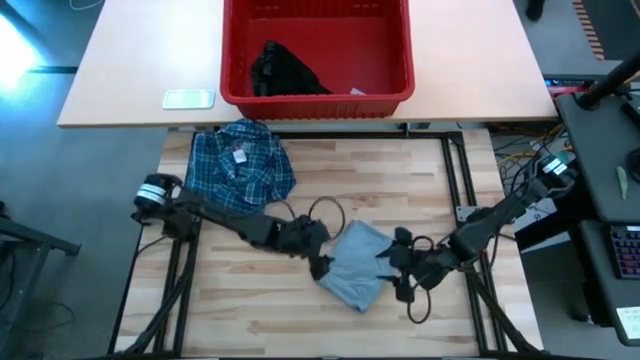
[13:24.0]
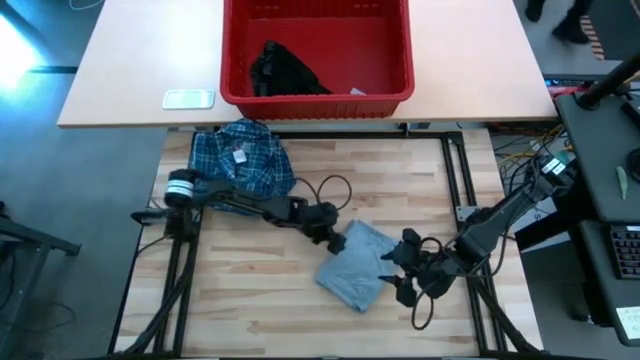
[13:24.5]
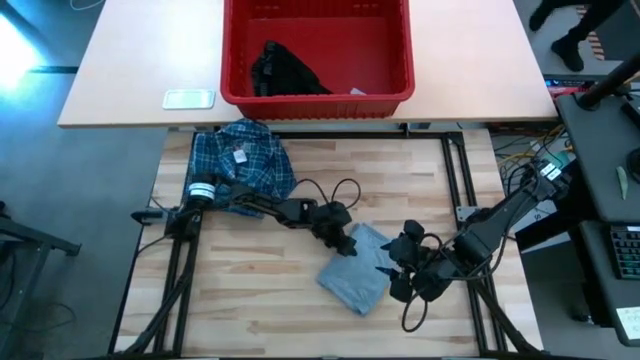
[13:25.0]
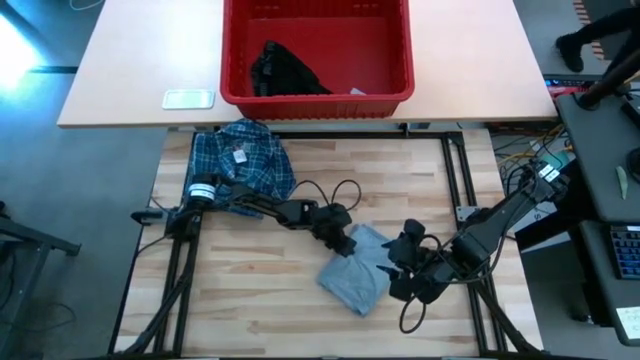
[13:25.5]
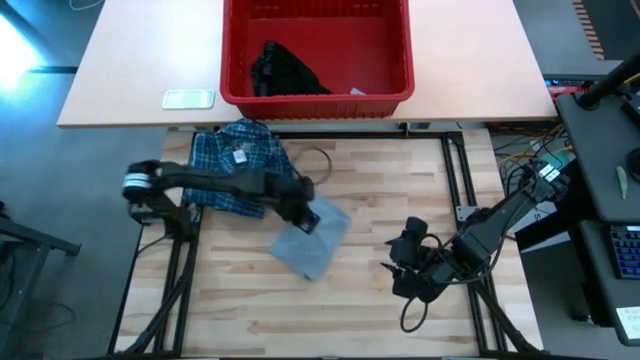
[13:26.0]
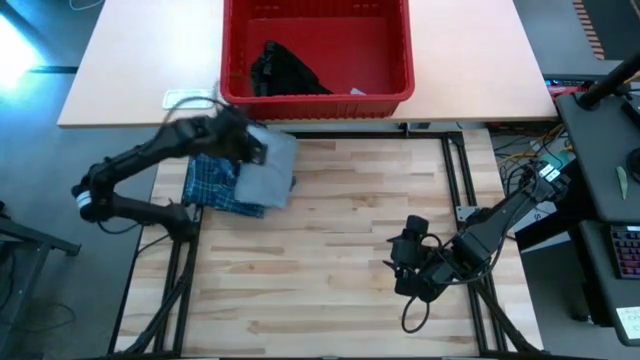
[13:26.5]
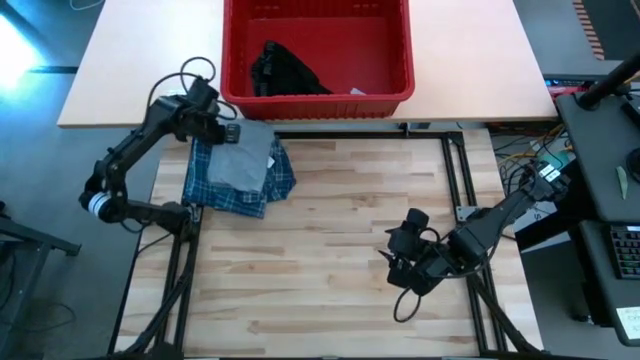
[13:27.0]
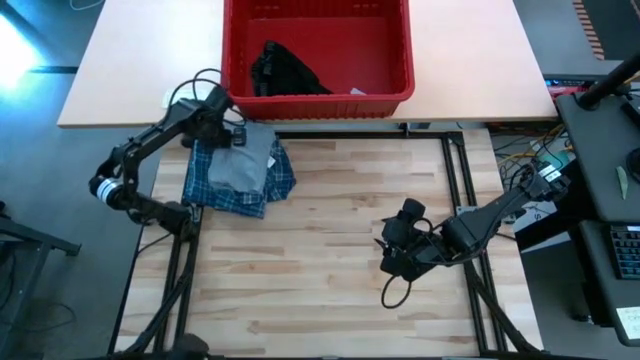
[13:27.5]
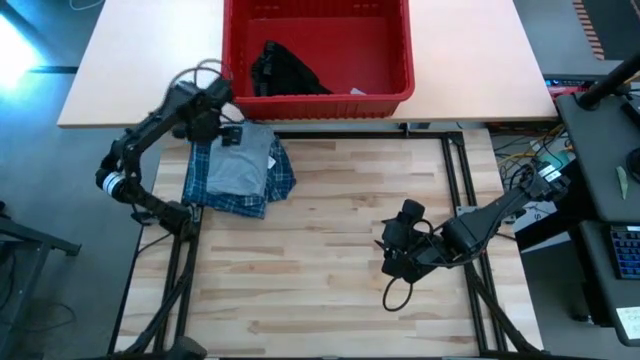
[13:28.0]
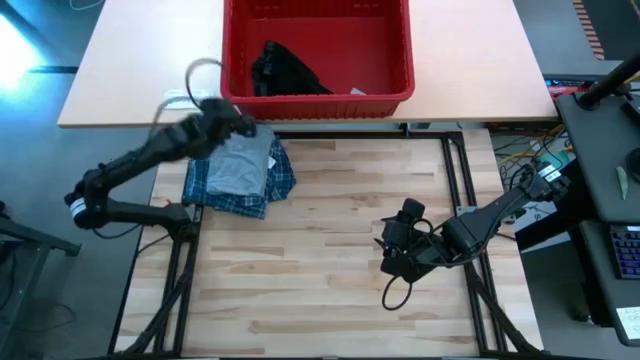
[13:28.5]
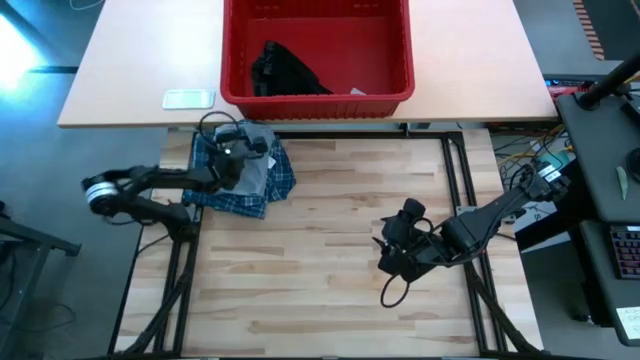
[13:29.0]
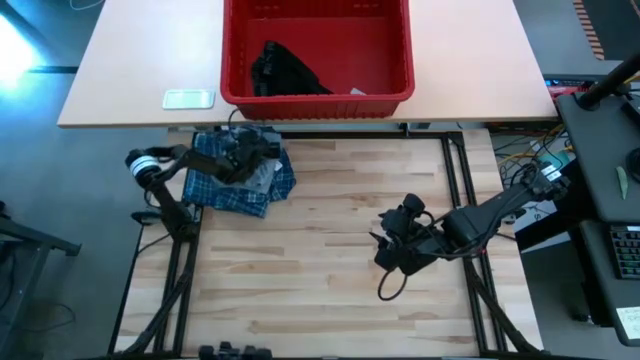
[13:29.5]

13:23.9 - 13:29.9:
Task: Fold Laundry from Bin
Stack the gray shirt on top of the blue patterned long sleeve shirt

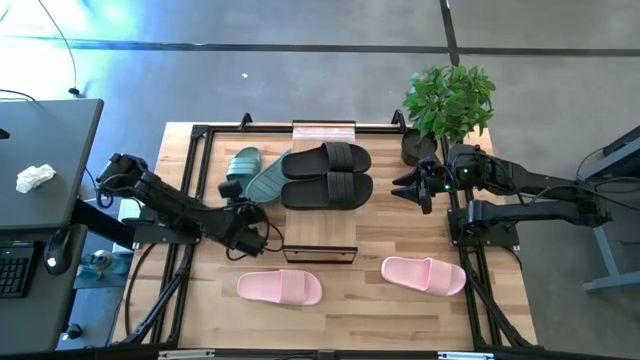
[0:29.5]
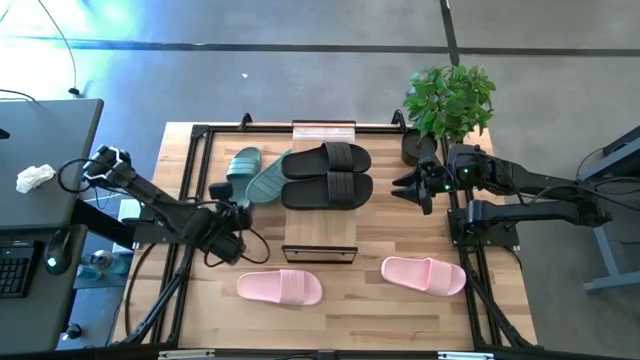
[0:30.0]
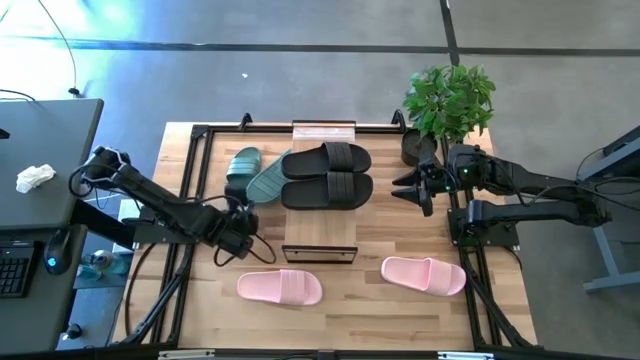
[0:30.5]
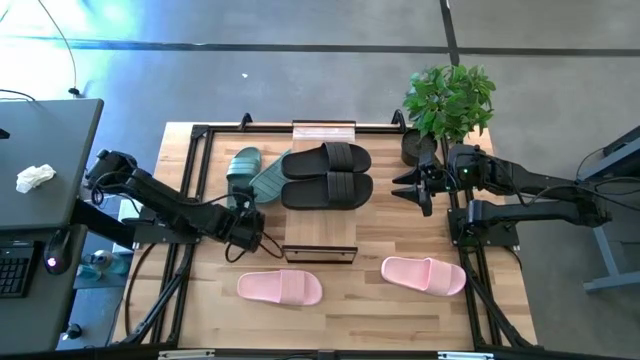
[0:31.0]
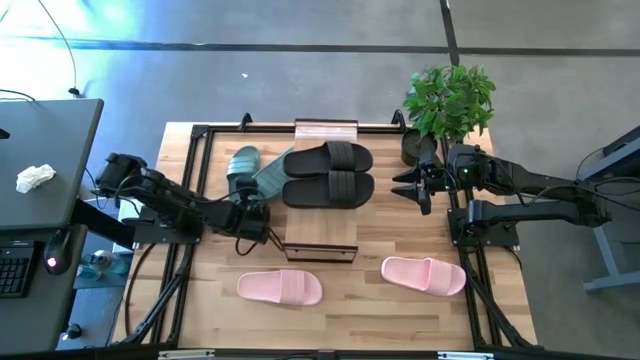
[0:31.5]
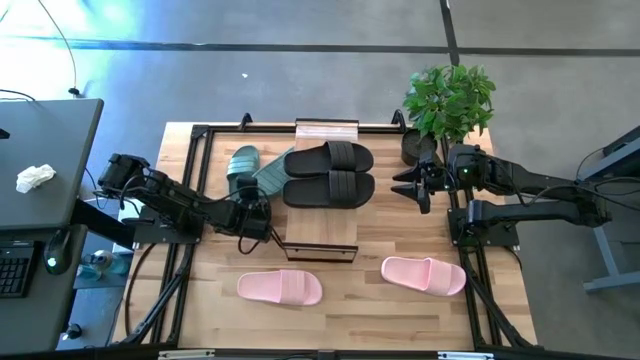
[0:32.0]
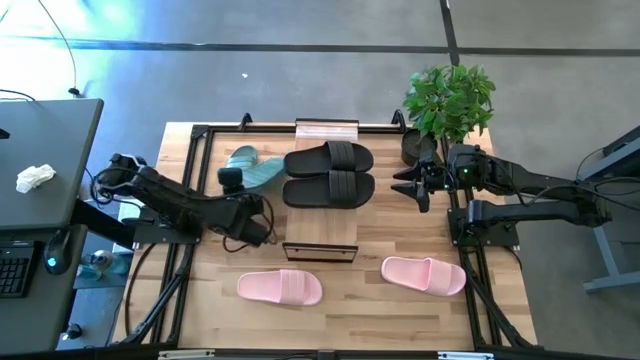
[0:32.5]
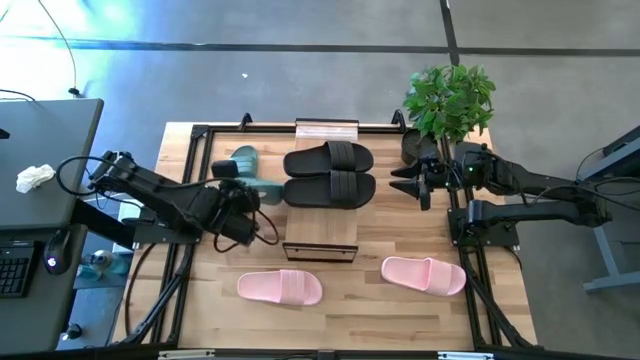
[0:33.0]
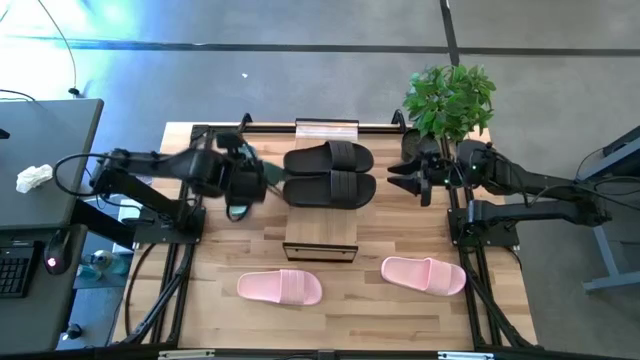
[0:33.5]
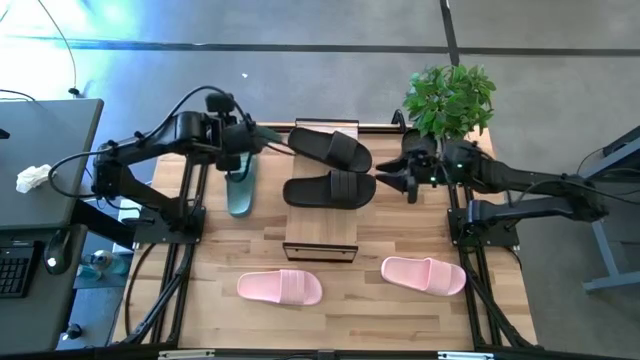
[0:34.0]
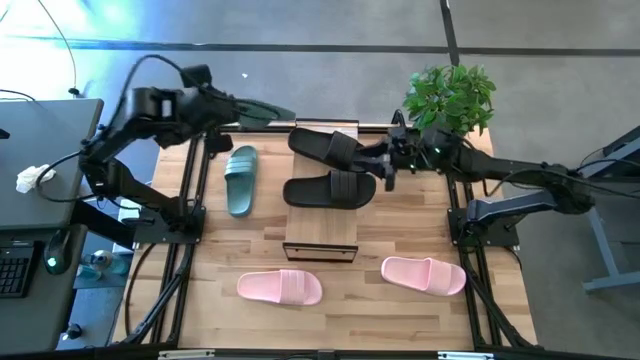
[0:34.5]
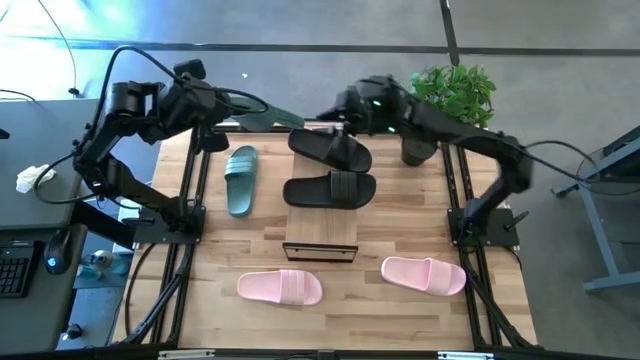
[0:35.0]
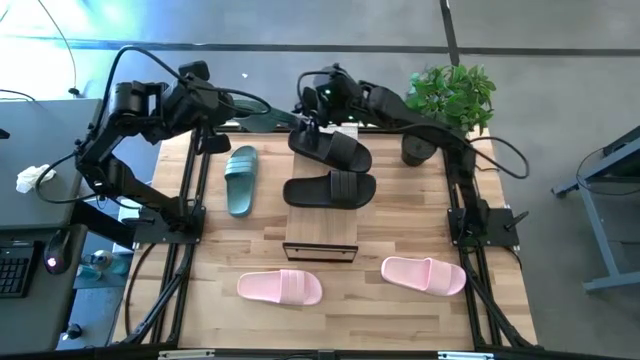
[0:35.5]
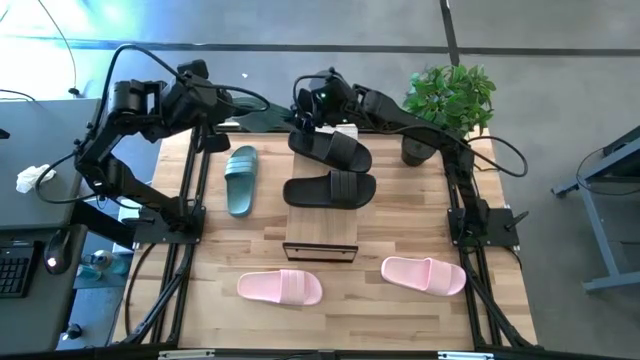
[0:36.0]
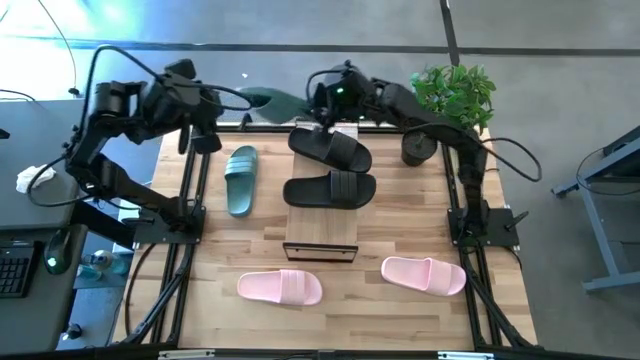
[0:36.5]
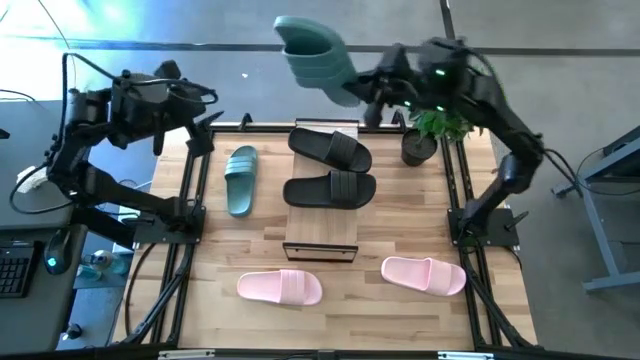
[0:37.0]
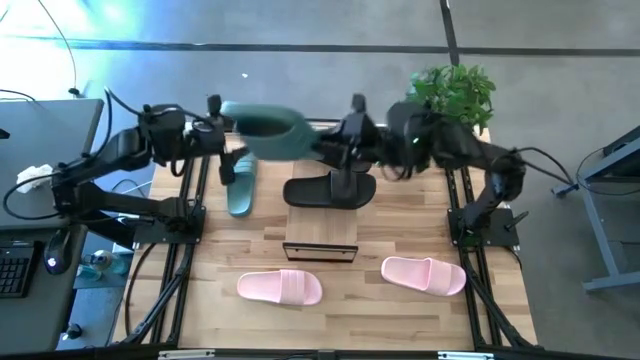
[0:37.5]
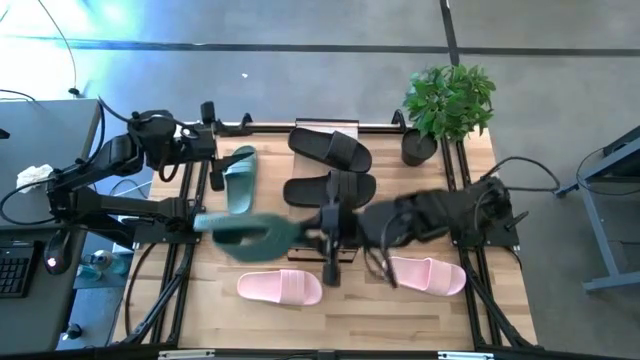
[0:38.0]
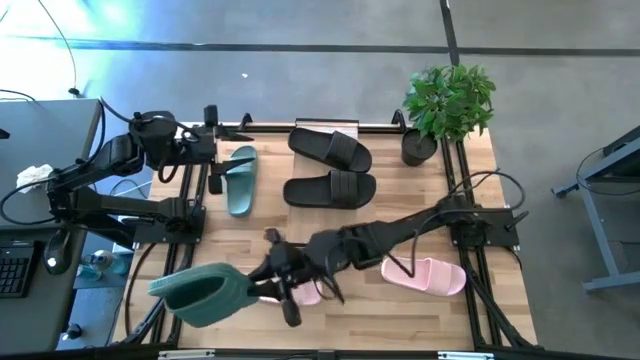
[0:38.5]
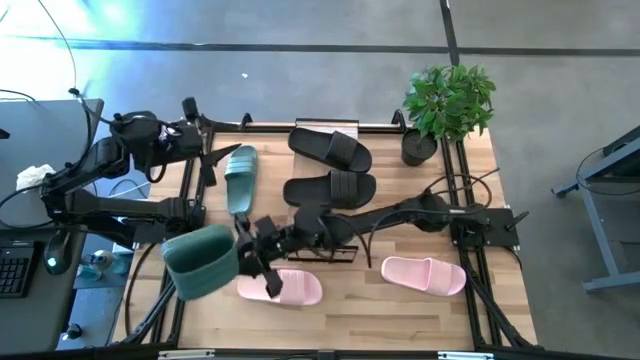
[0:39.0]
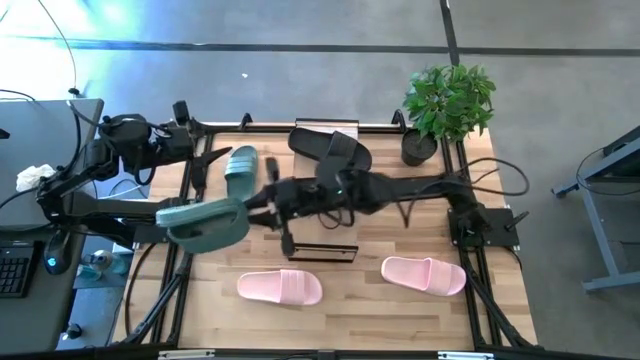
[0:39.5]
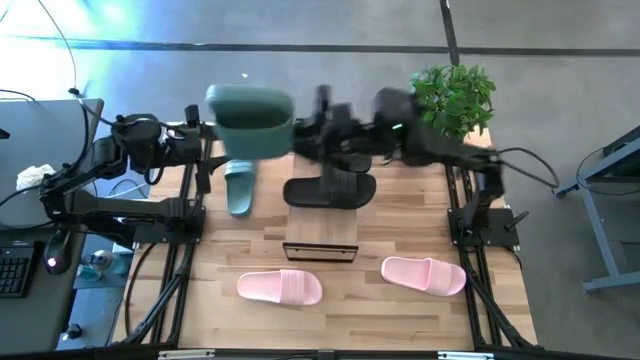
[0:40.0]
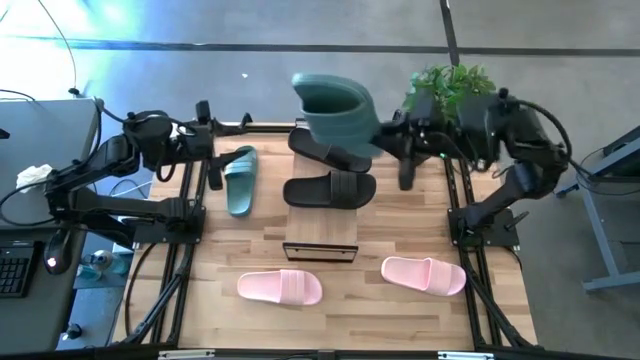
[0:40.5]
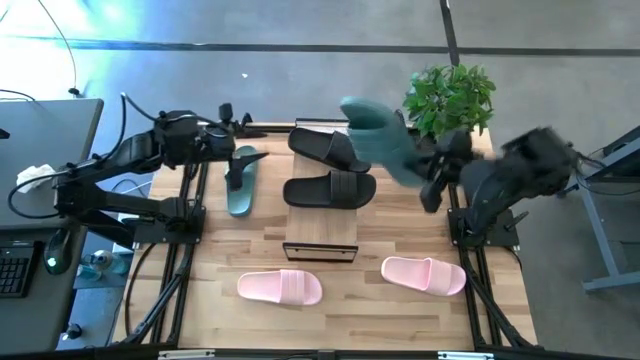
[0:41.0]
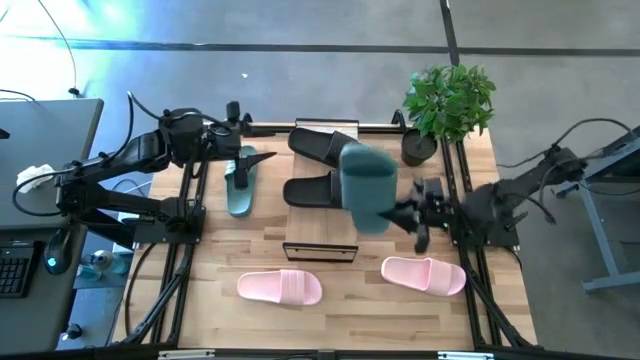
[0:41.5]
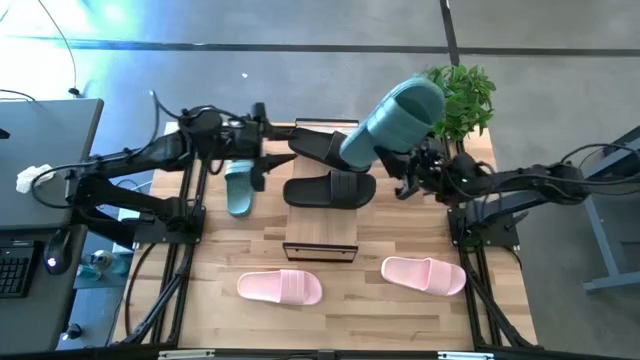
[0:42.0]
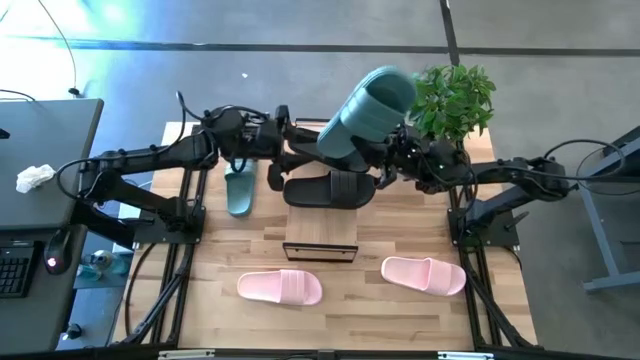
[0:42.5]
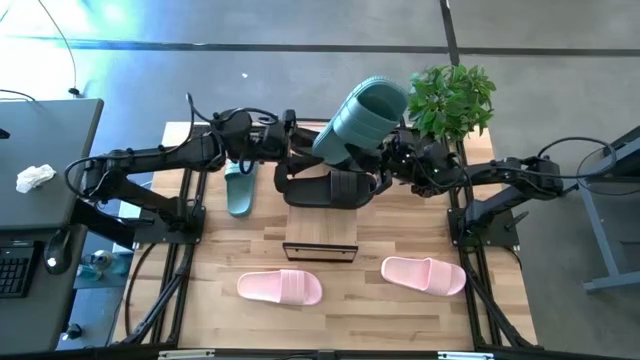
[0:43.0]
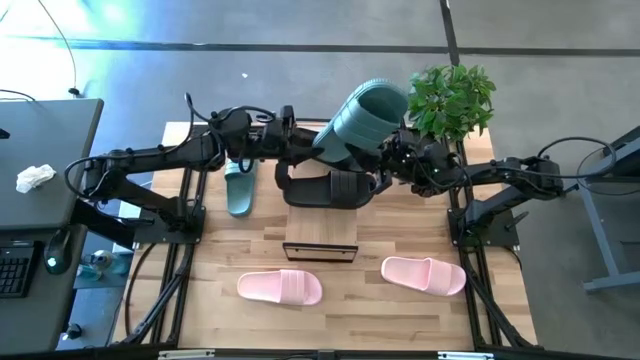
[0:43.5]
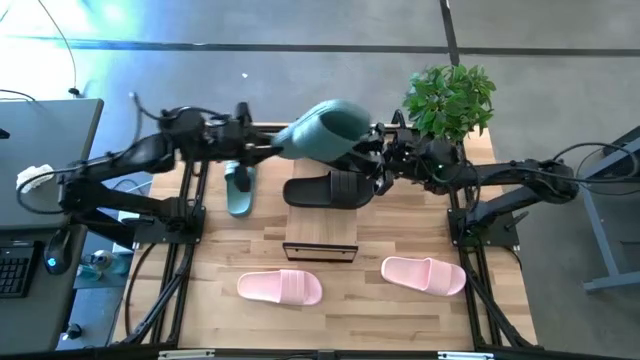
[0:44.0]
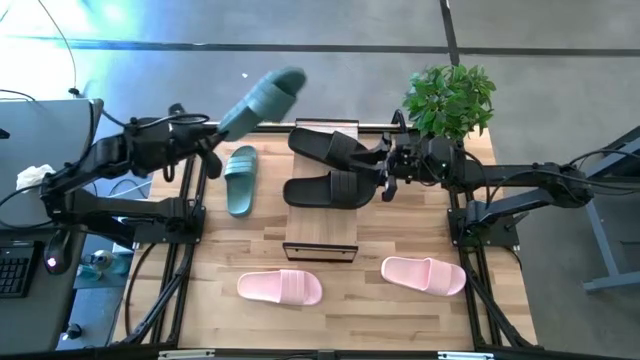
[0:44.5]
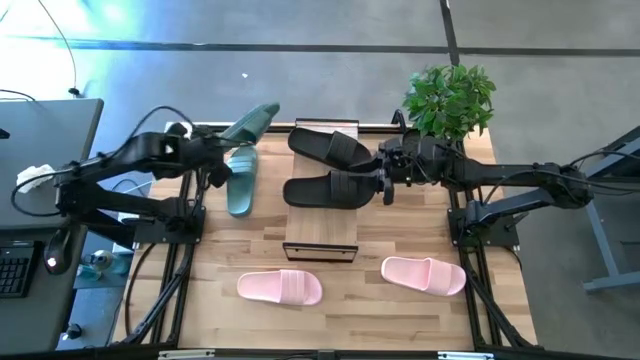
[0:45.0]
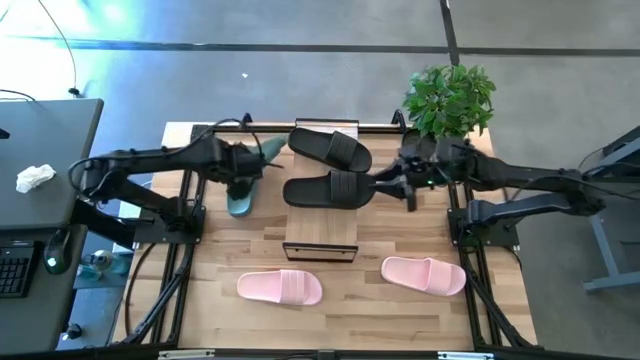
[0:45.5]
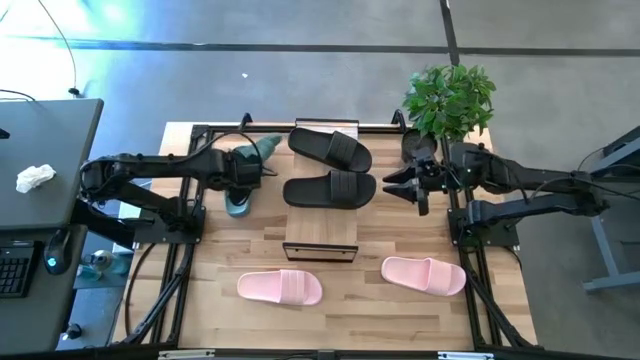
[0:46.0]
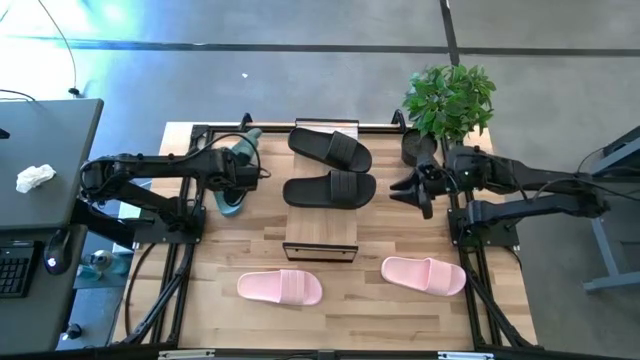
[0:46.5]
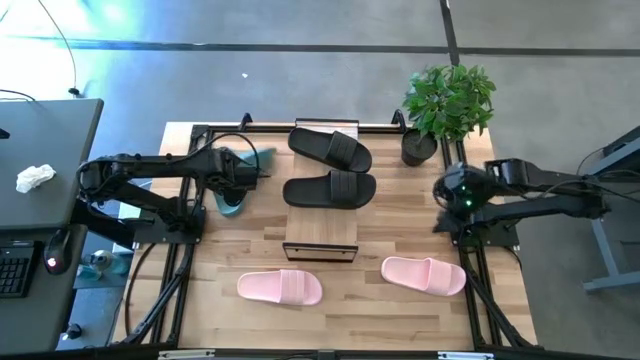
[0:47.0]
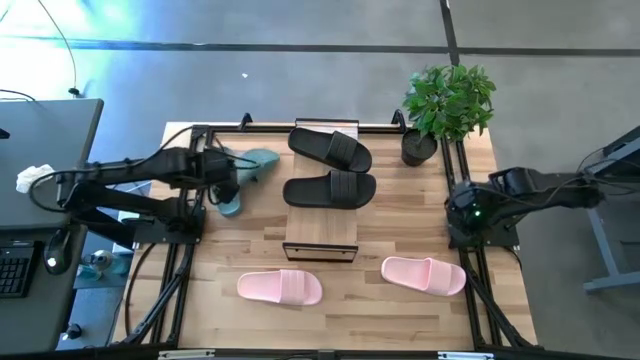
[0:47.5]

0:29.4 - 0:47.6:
Task: Pick and place slides into the shelf
Adjust the green slide
